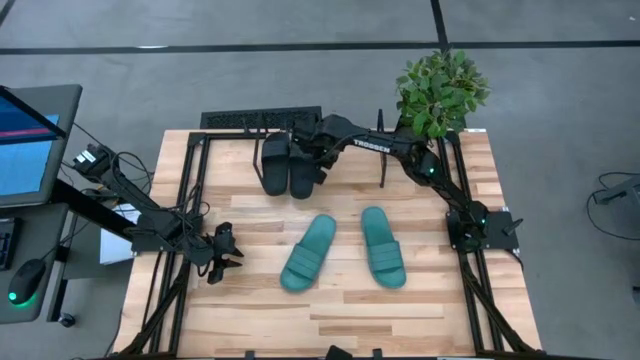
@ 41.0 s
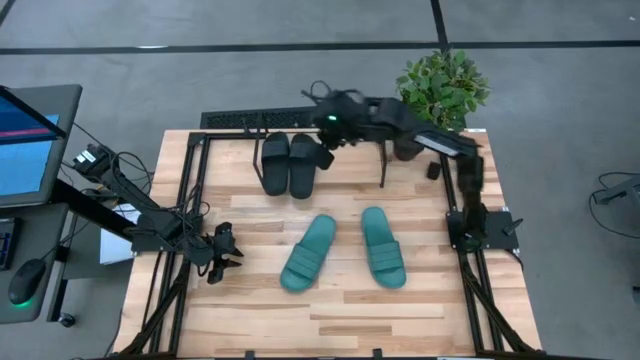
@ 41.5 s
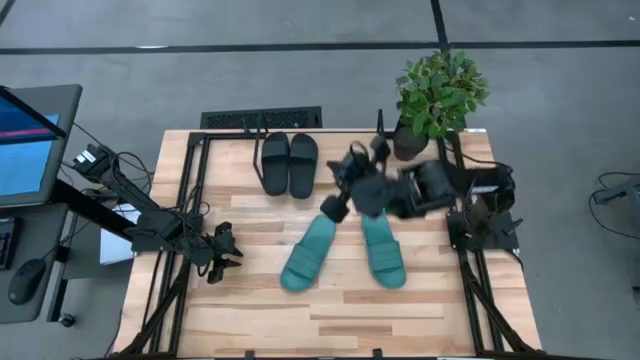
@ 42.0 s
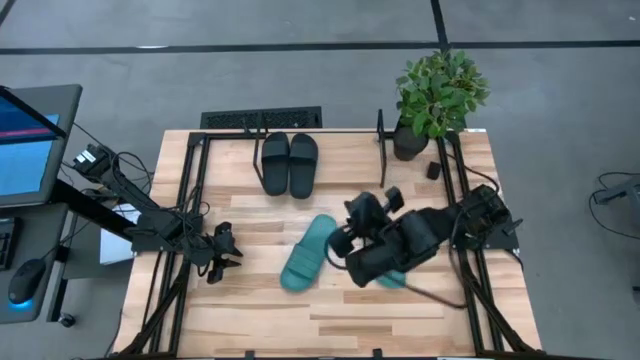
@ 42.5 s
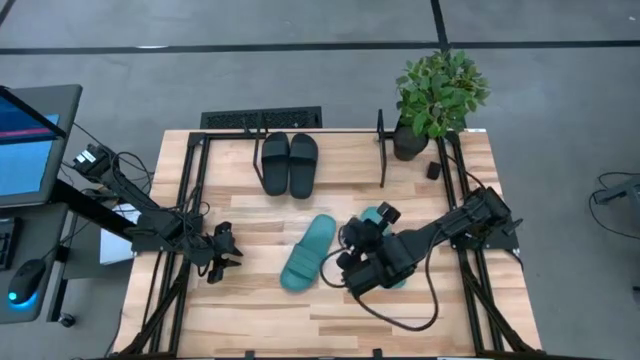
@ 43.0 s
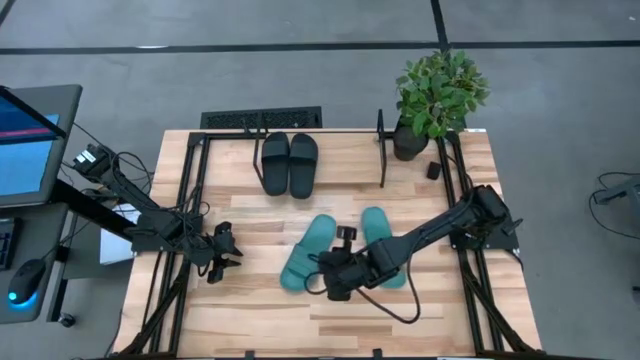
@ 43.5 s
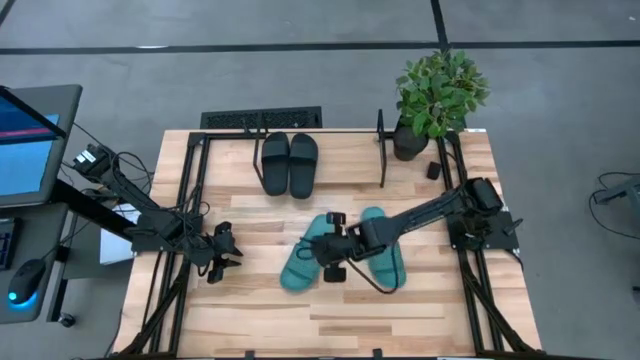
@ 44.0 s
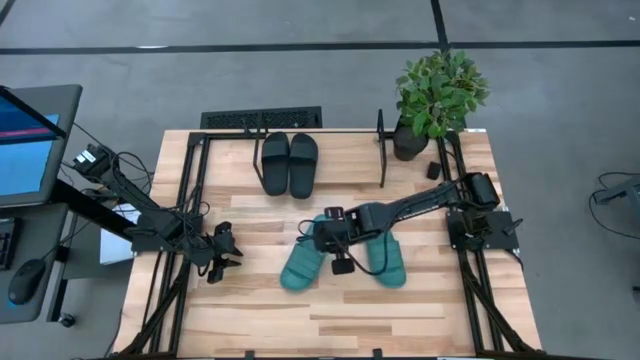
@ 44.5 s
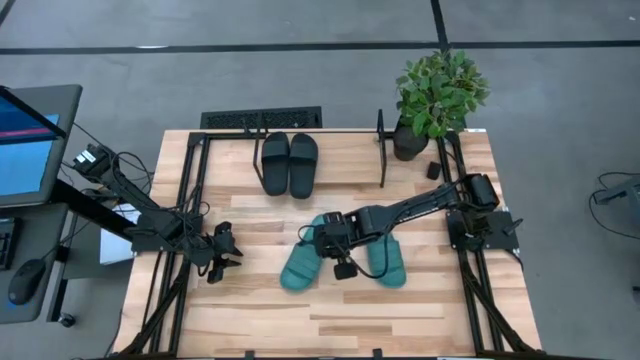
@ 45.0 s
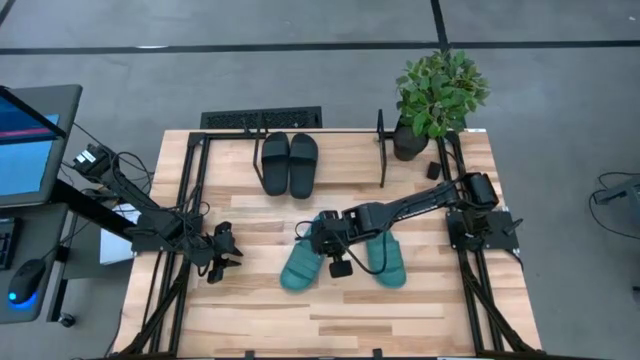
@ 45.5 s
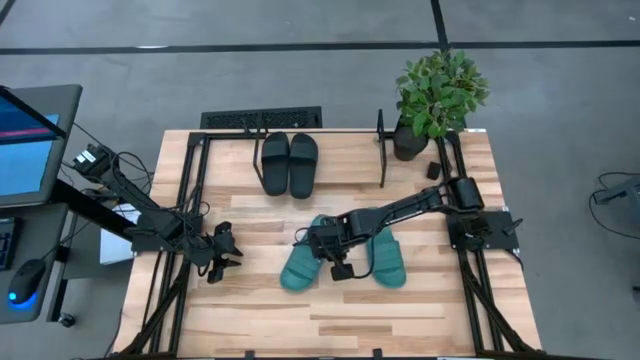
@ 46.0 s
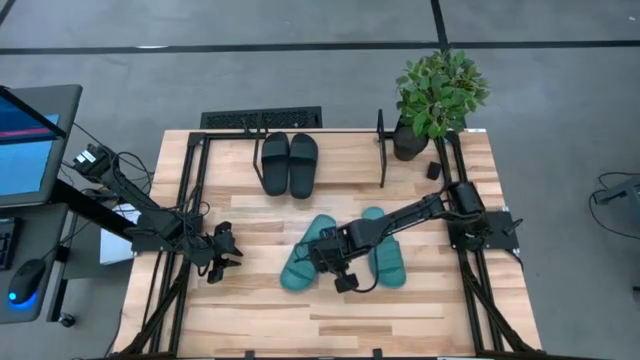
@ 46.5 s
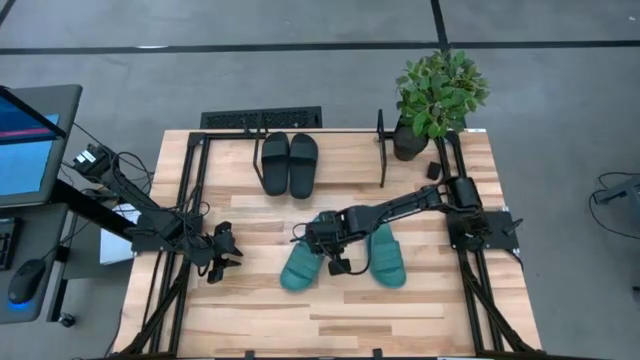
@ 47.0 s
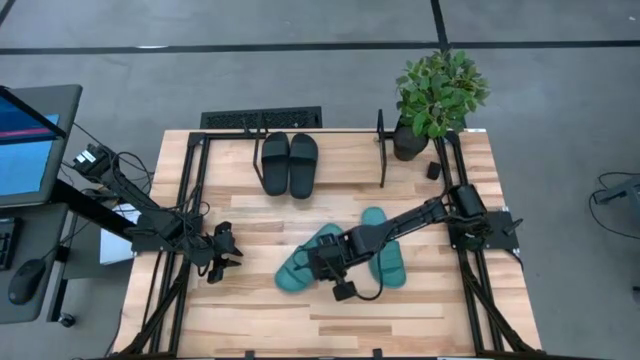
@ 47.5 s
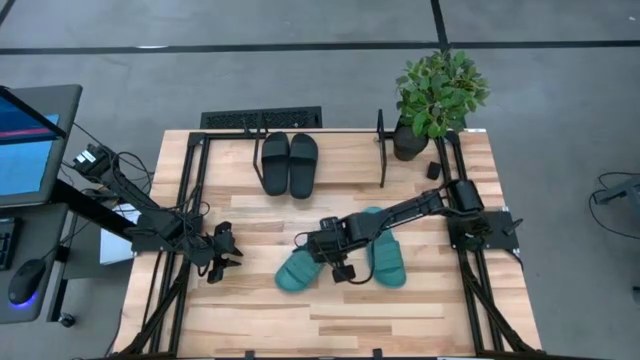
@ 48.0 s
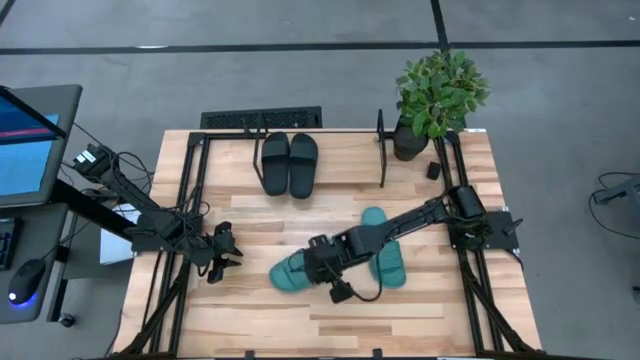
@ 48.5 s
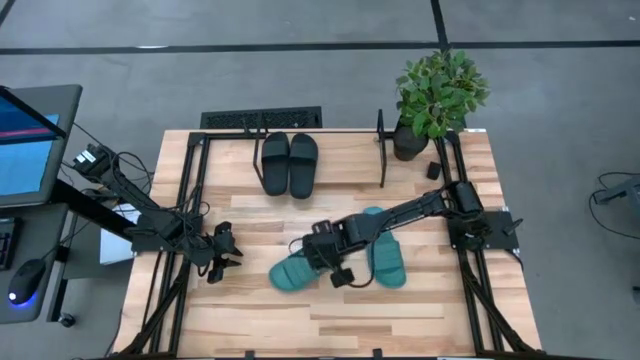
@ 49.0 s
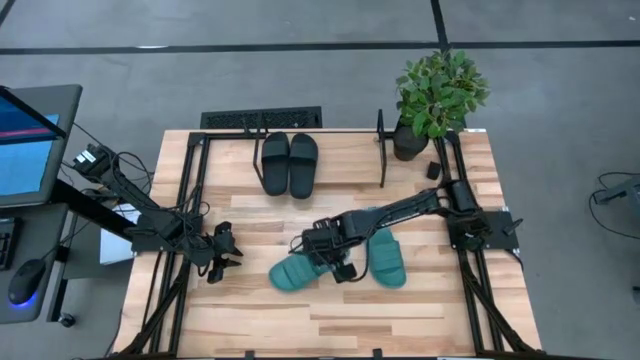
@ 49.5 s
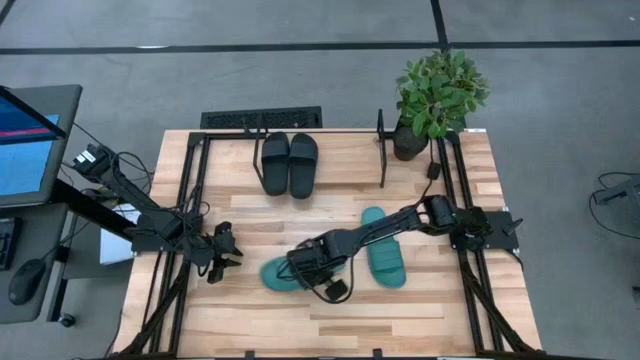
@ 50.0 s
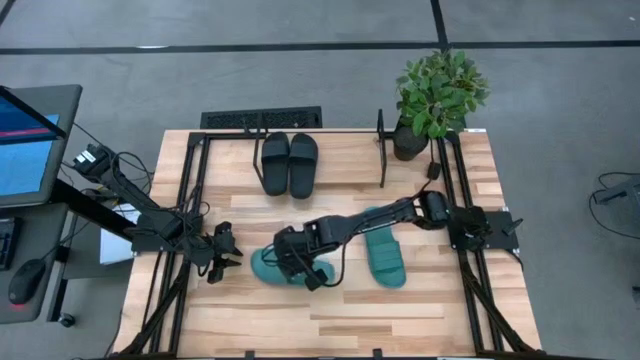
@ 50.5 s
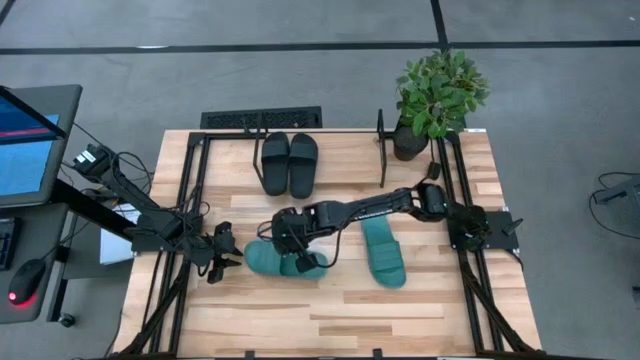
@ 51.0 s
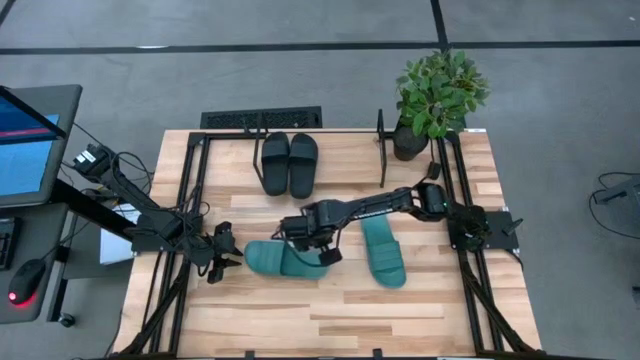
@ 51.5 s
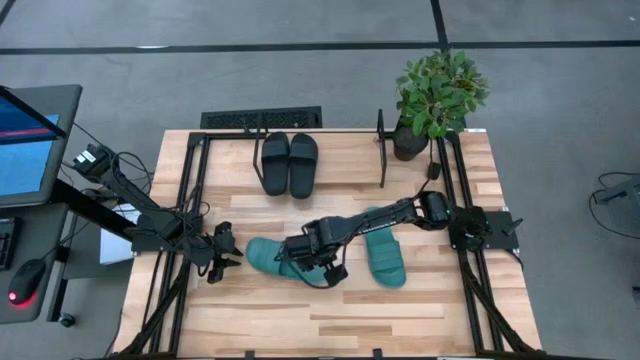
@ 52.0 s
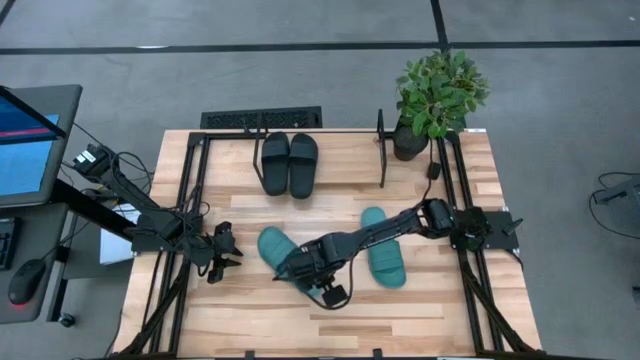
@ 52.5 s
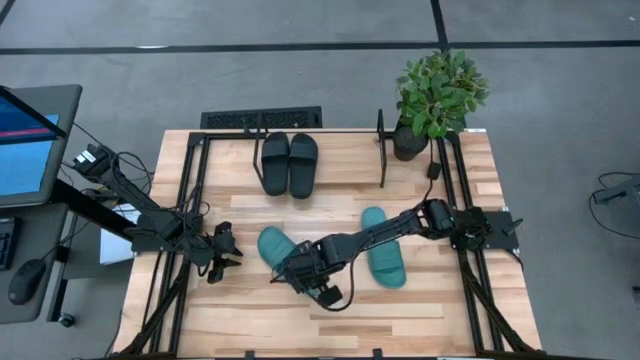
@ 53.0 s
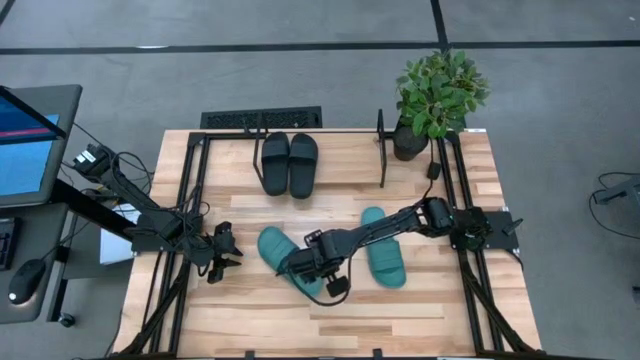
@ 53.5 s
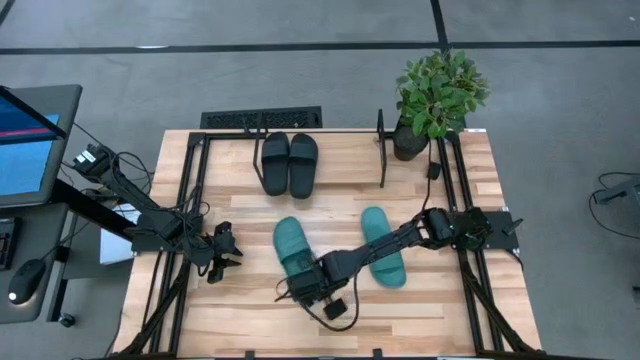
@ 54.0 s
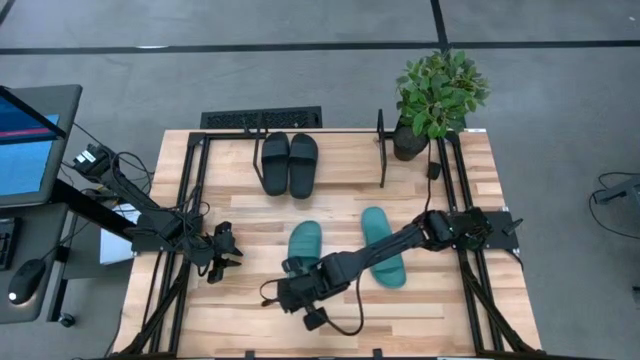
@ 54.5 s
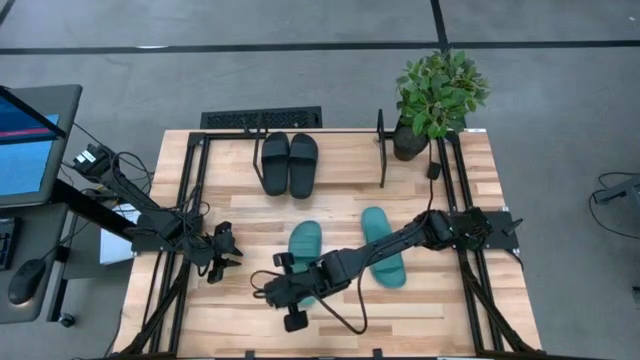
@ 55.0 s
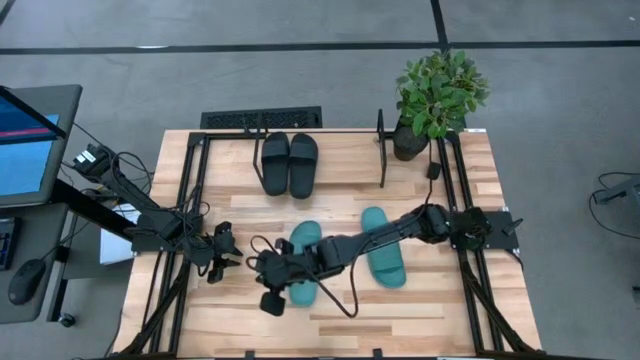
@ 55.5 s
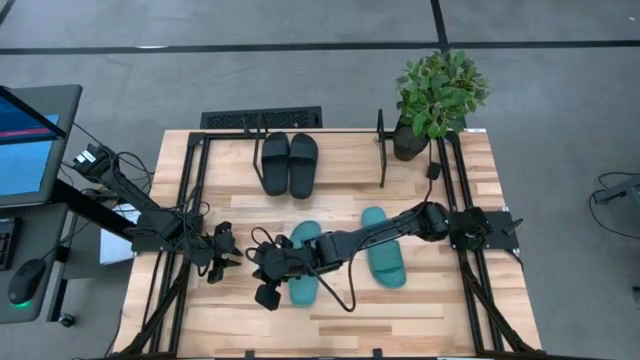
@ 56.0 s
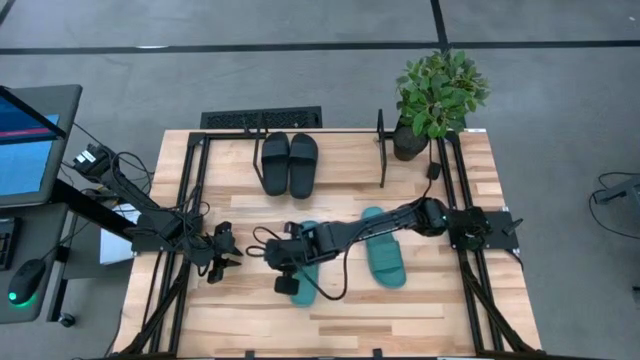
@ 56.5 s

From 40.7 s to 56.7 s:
Task: Pick and place slides into the shelf
Put the left green slide on the shelf

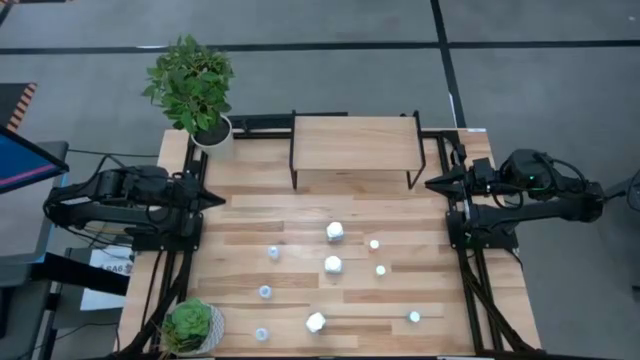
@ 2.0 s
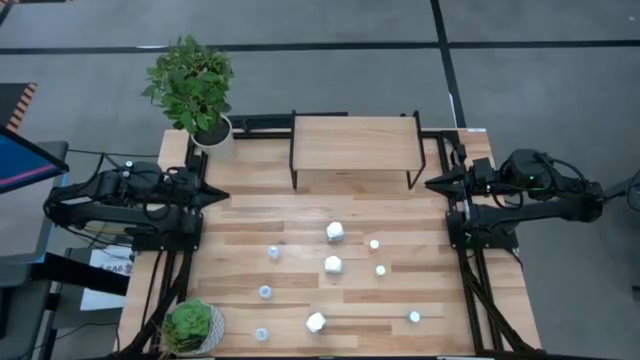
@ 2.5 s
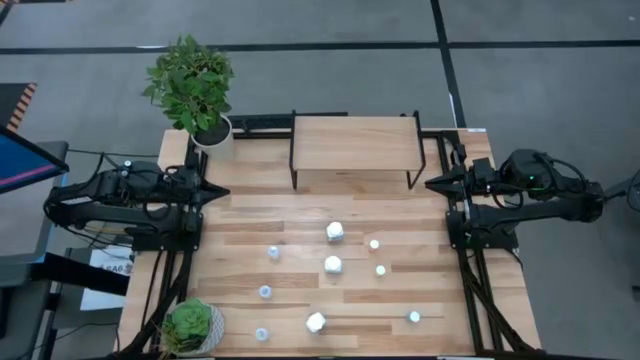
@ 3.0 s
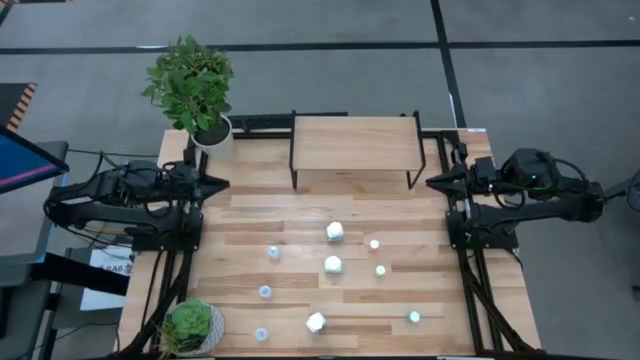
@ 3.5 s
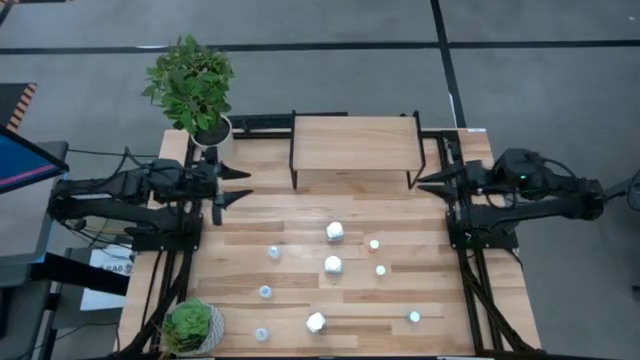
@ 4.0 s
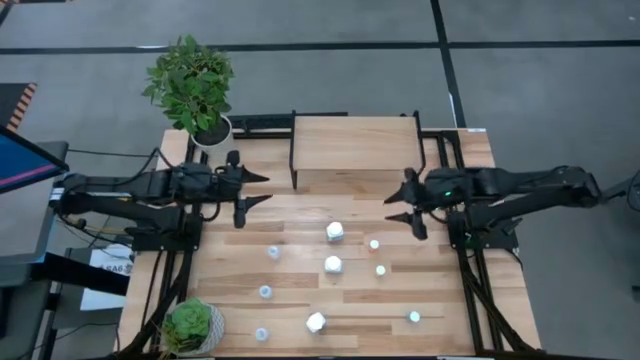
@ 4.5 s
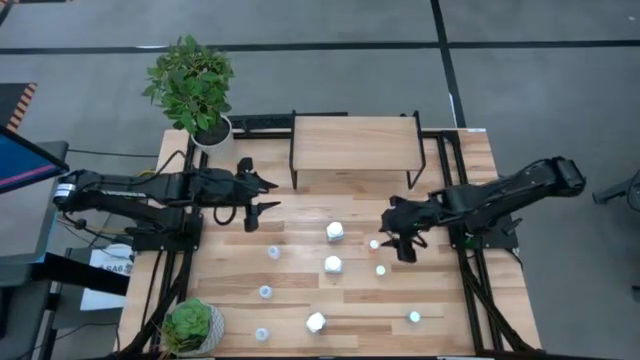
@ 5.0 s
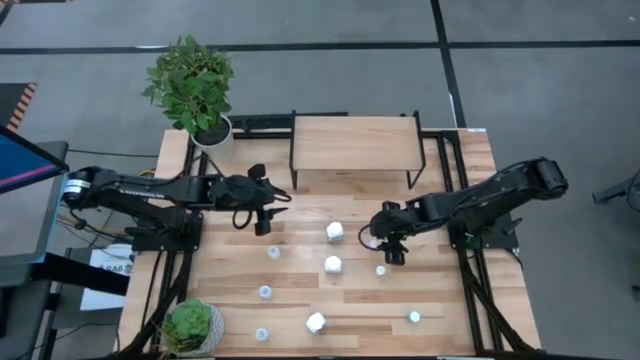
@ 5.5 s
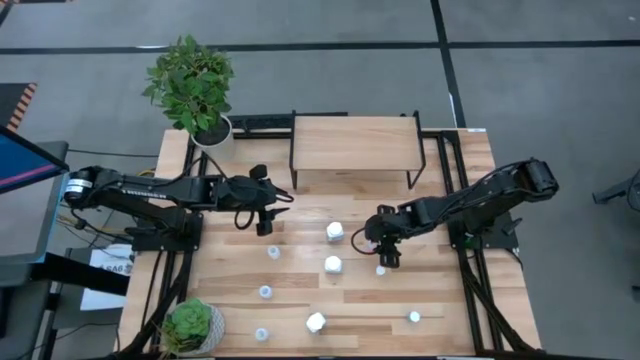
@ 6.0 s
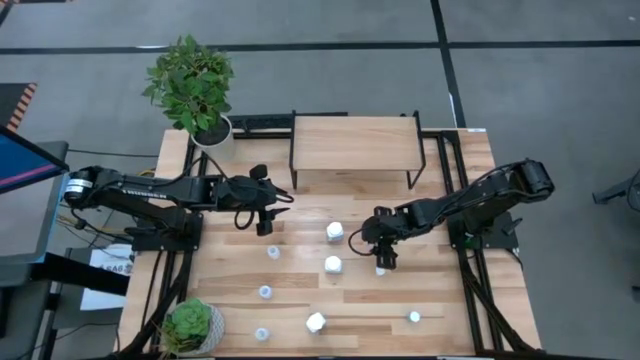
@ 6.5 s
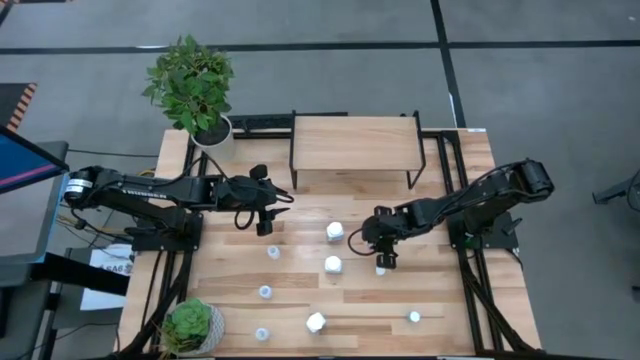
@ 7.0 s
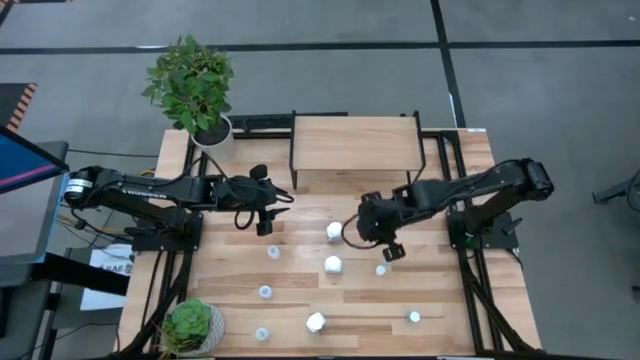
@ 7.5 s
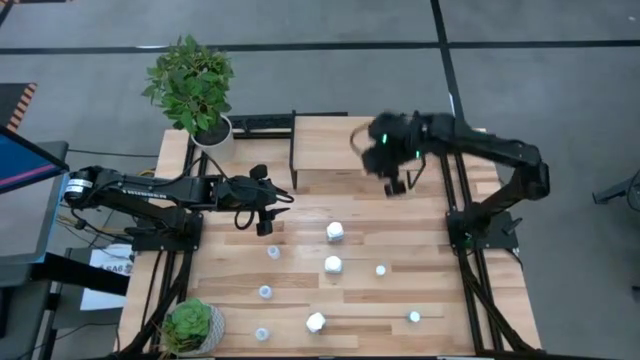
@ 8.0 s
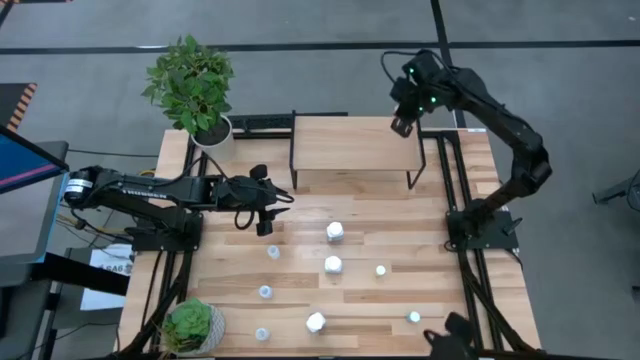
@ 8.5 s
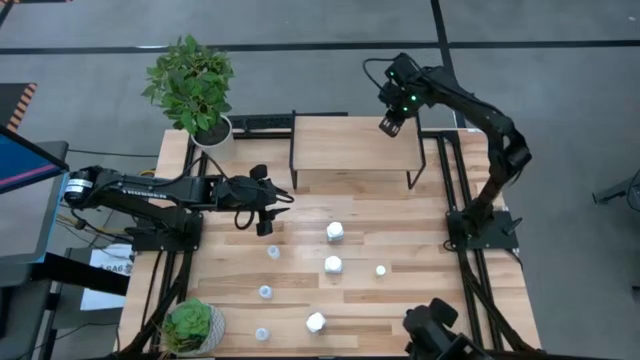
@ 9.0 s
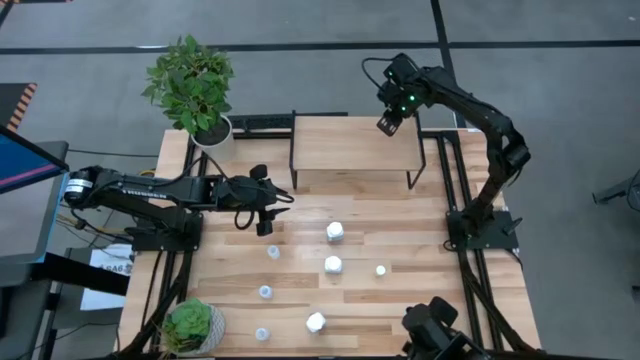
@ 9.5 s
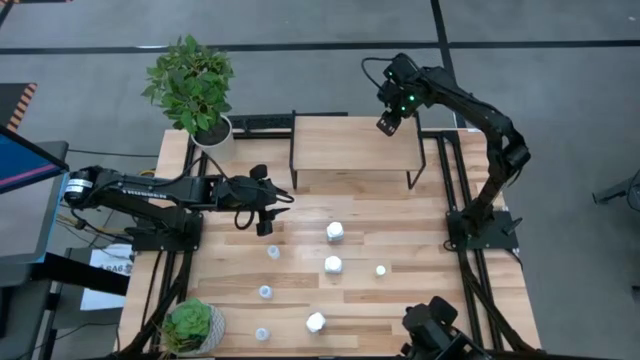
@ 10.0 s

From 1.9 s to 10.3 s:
Task: Pick and place medicine bottles onto shelf by color
Put the pink pill bottle on the shelf
